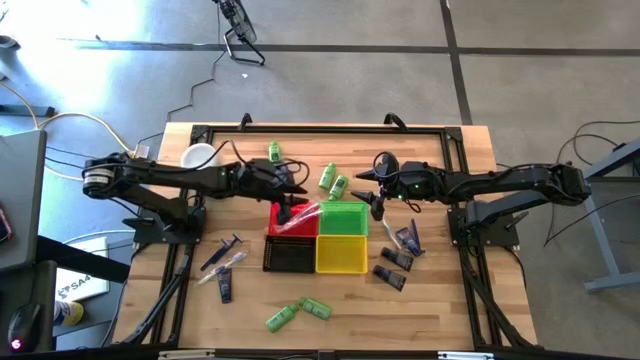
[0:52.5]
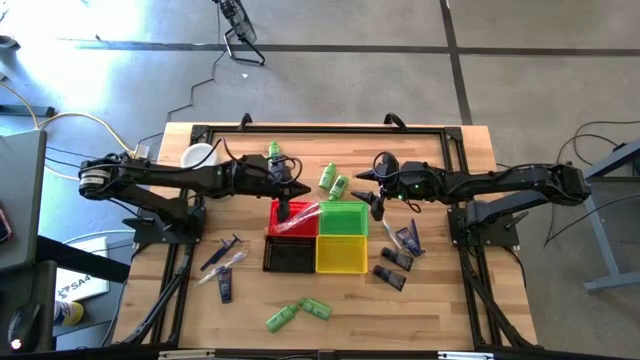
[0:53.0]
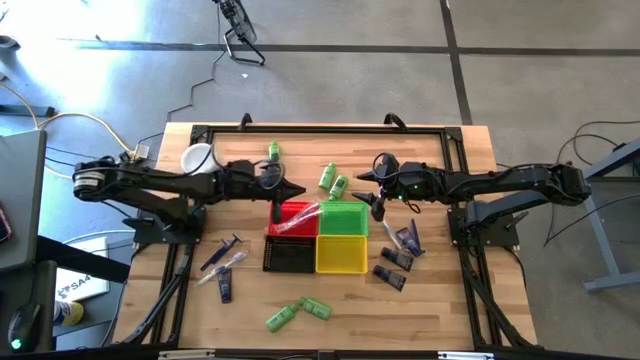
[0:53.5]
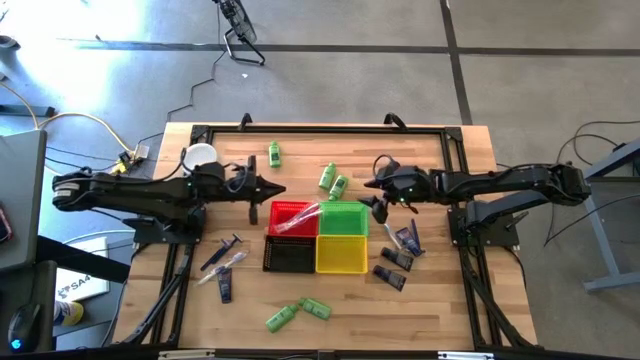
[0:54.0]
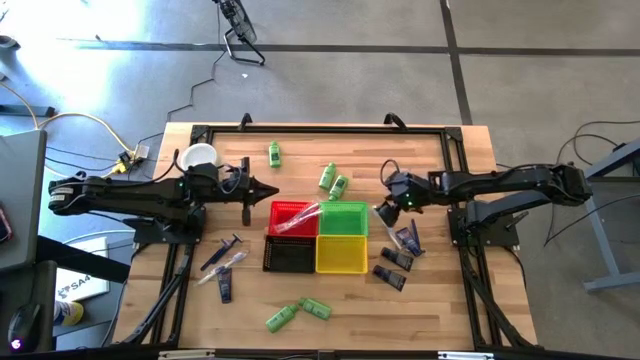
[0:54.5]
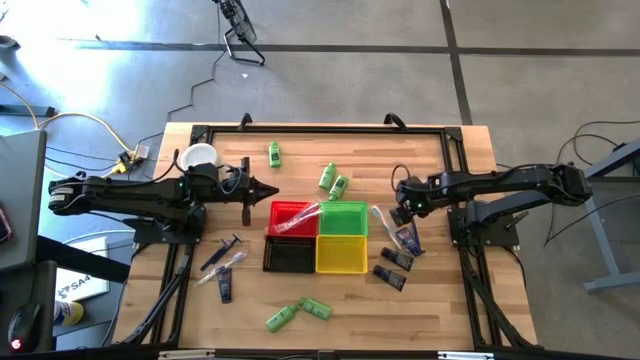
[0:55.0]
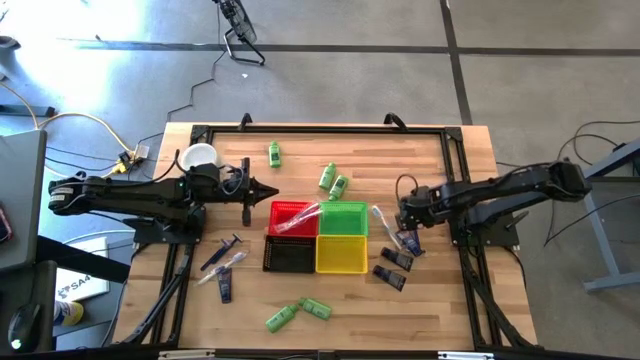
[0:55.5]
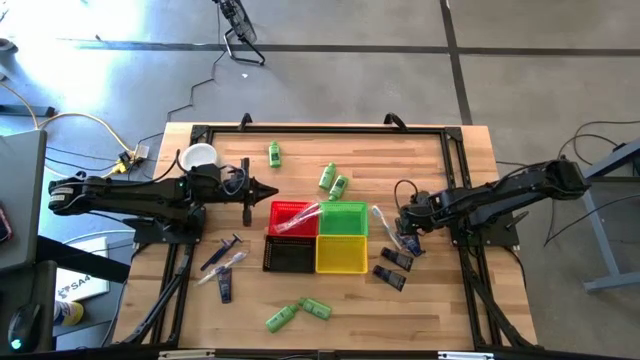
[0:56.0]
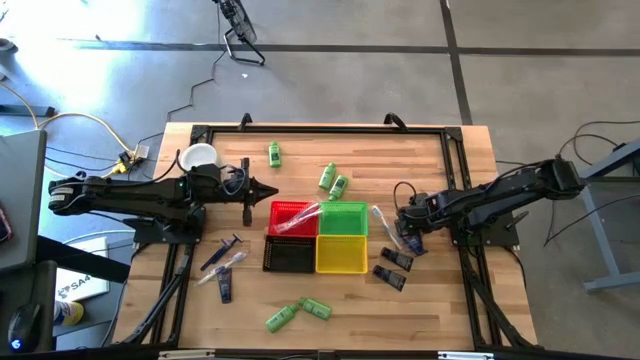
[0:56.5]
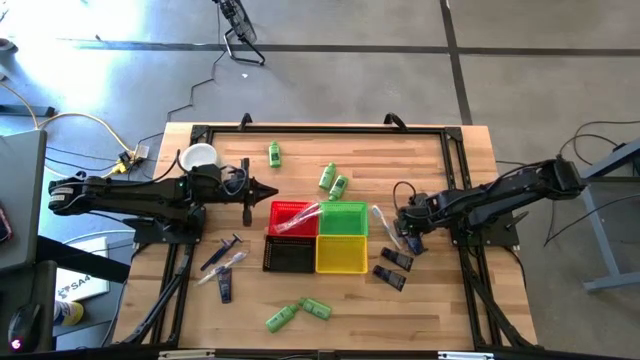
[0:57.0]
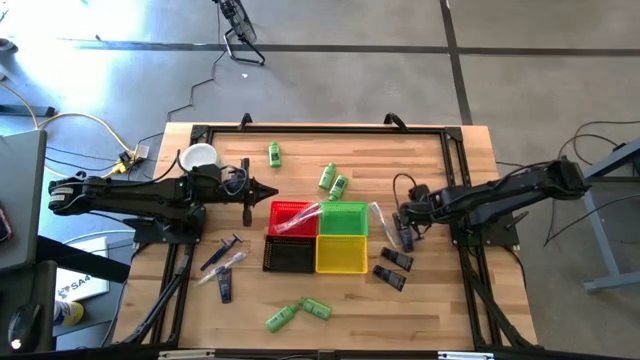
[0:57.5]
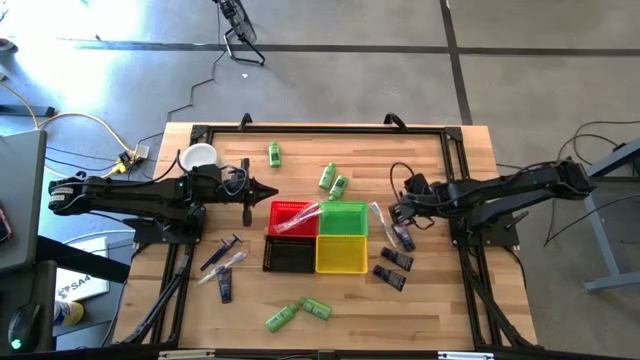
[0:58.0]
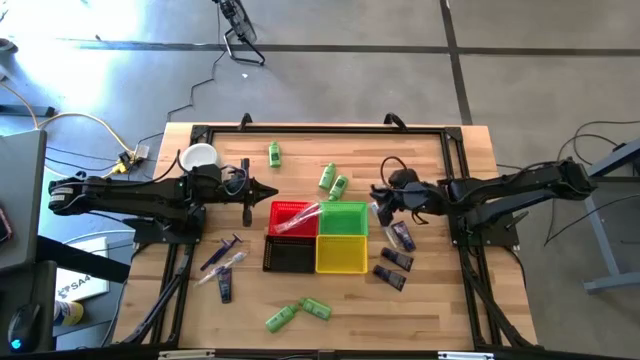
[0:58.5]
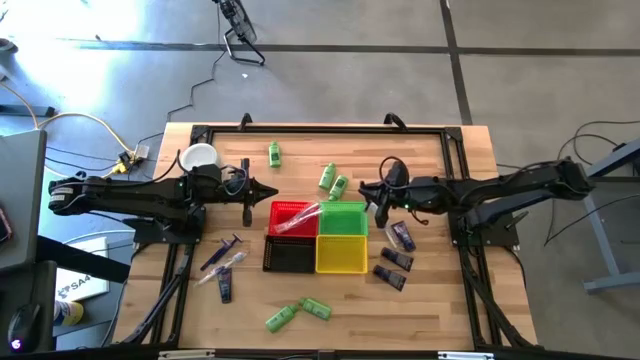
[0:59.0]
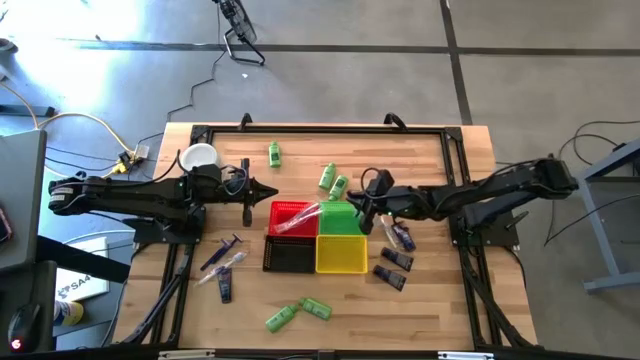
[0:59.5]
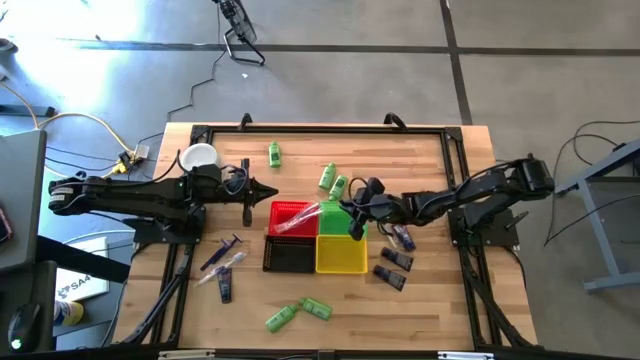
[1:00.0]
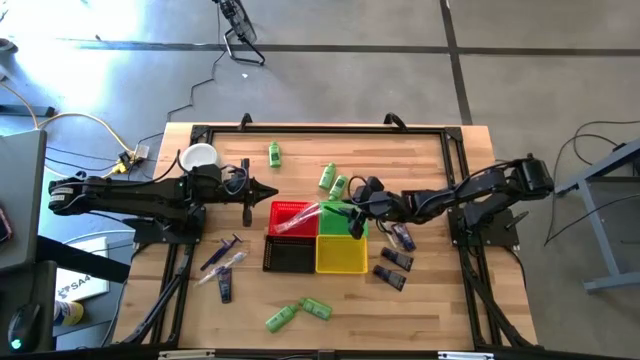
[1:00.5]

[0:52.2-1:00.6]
Task: Pick & Place Travel size toiletries
Put the blue razor into the green bin

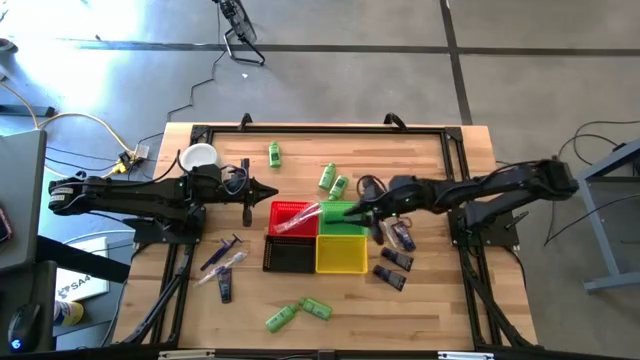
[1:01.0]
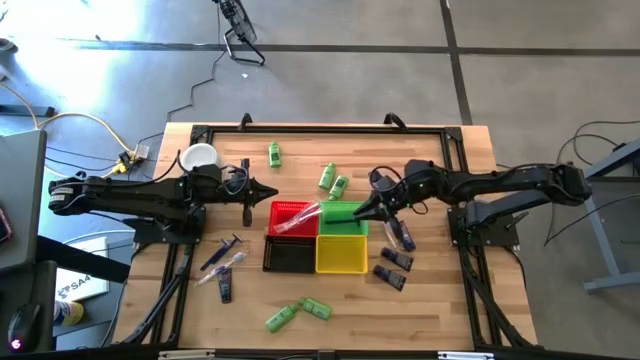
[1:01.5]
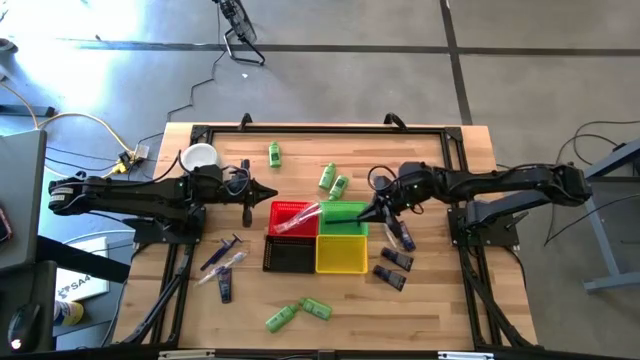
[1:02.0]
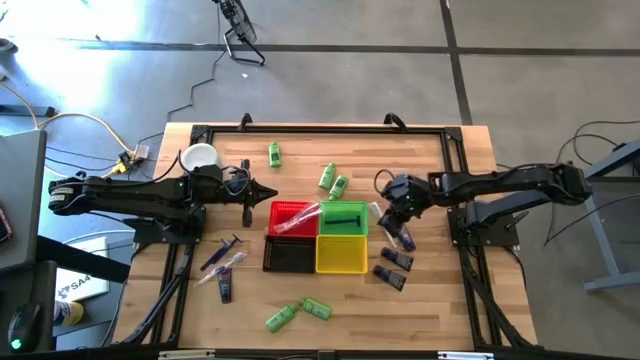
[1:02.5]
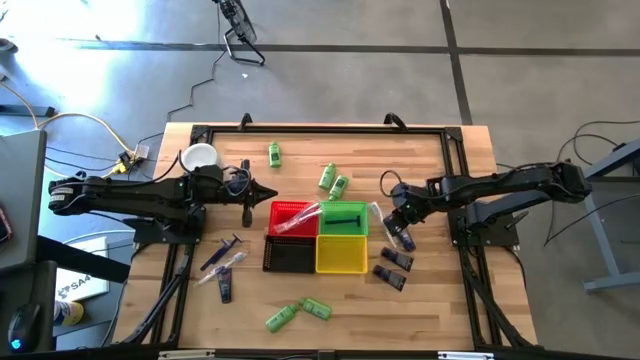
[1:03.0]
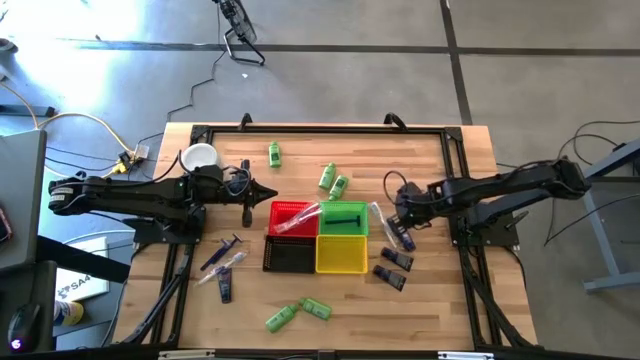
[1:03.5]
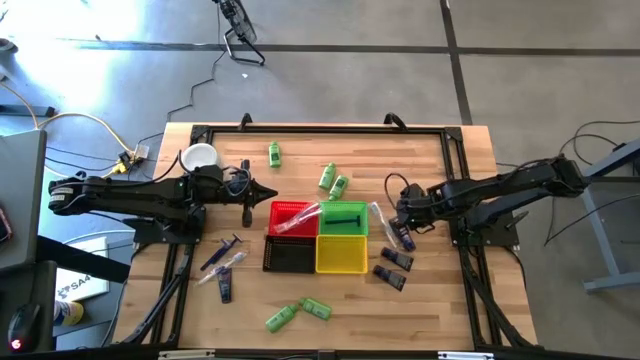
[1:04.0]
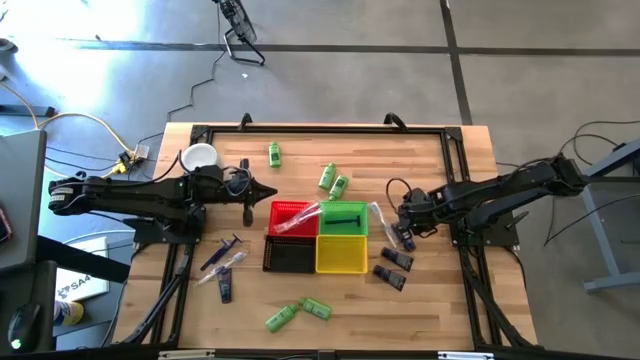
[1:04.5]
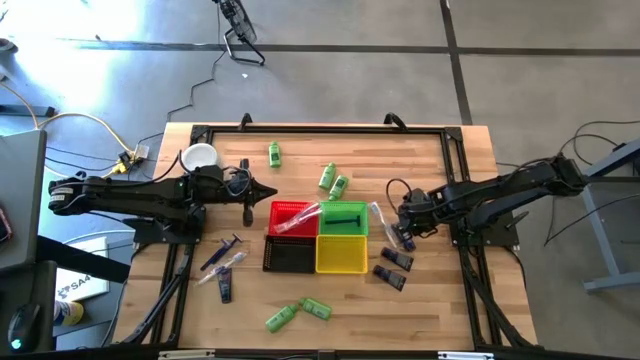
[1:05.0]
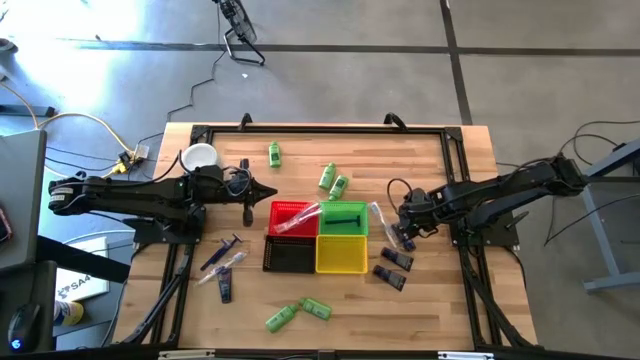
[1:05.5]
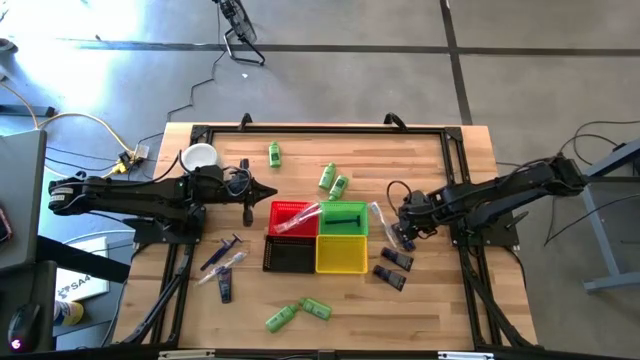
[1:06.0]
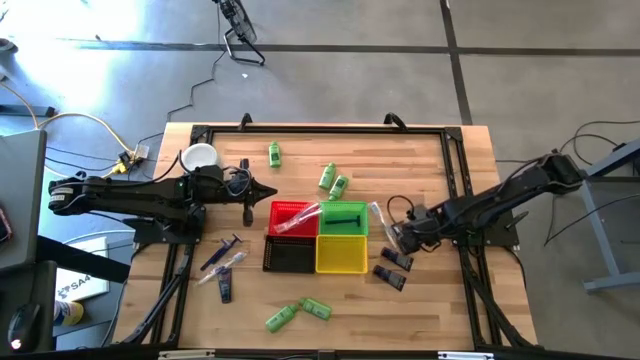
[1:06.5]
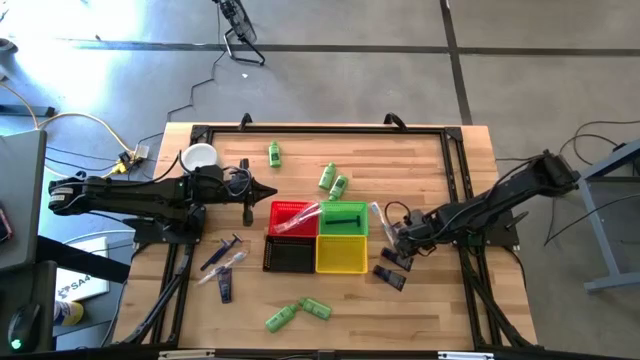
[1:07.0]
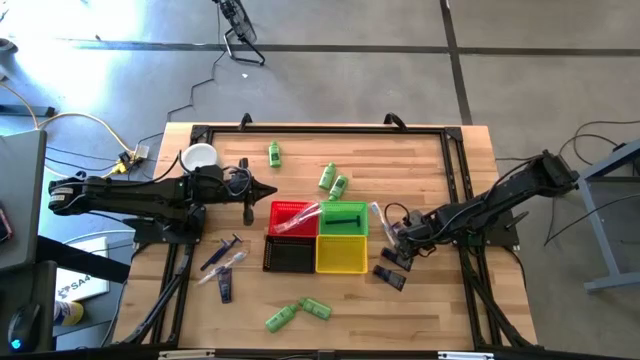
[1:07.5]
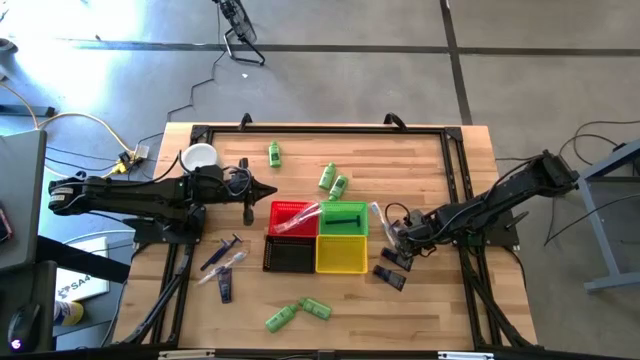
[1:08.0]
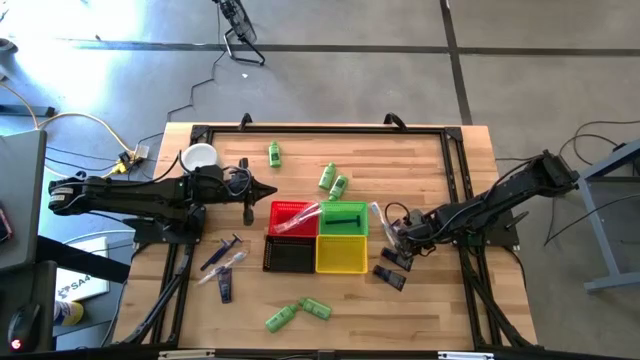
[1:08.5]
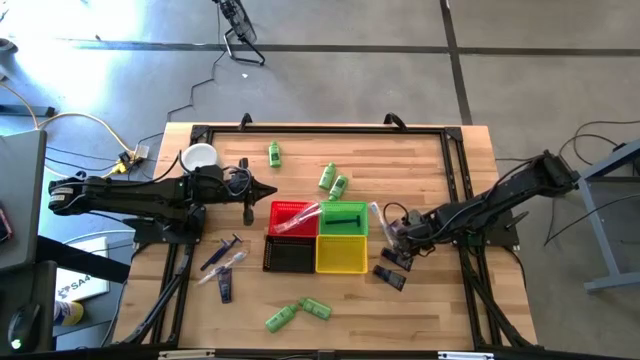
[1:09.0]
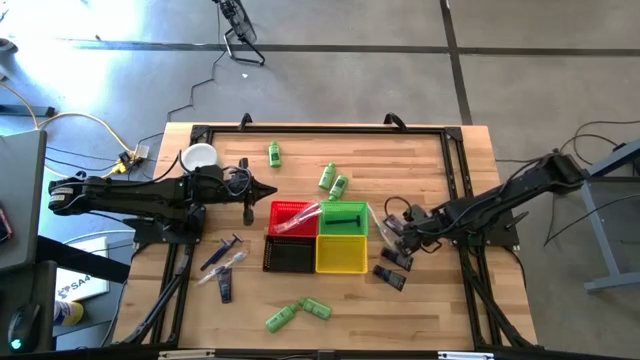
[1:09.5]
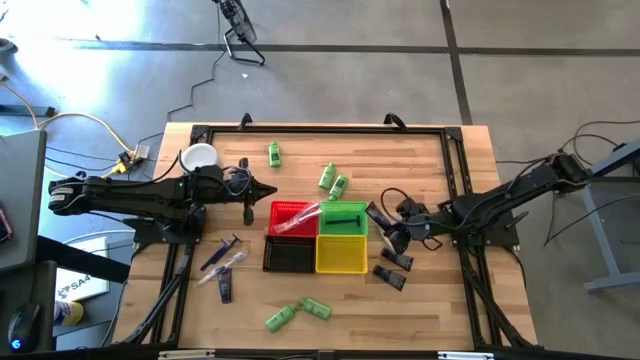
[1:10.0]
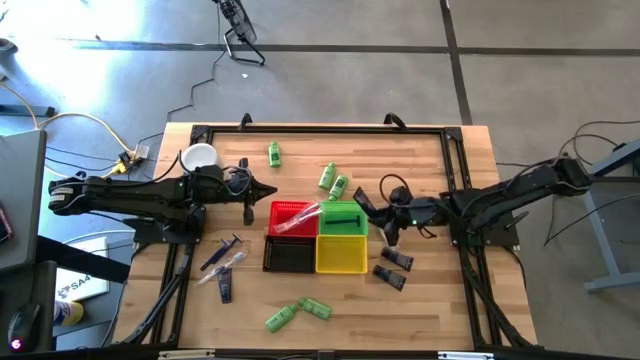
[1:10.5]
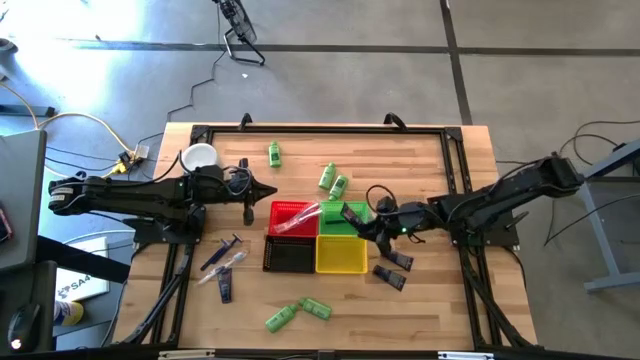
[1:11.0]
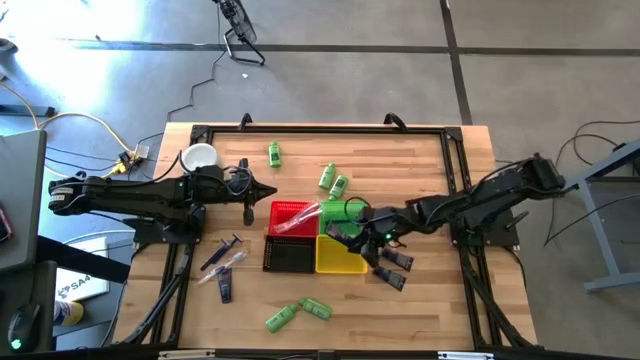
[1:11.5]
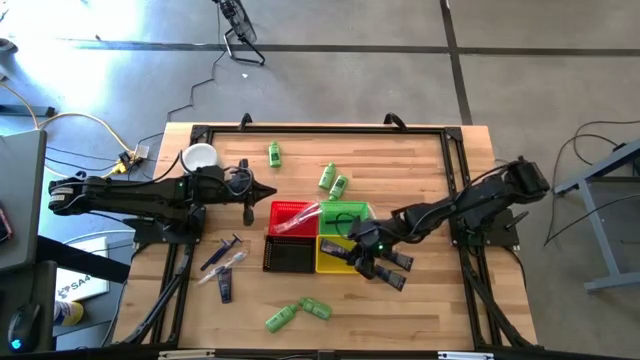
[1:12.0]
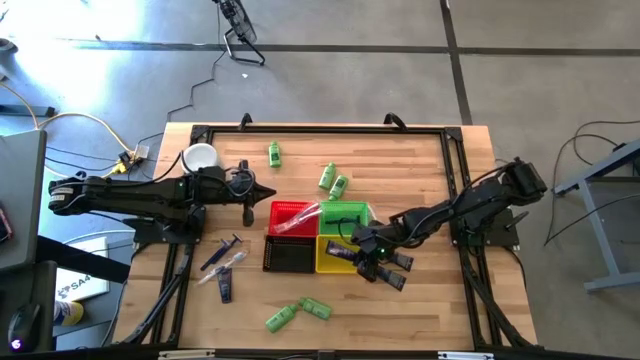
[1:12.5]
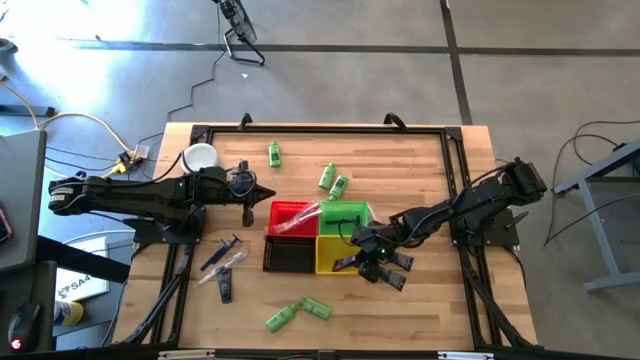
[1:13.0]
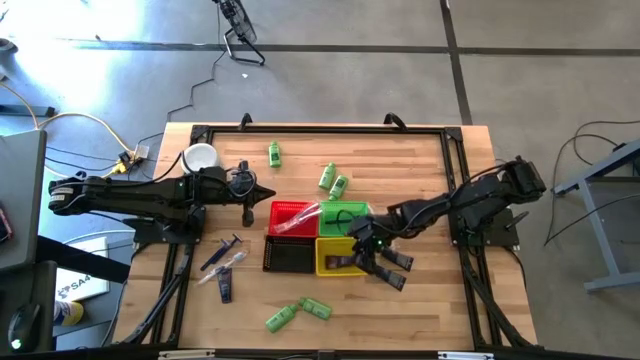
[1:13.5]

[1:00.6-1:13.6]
Put the dark blue shaving cream into the yellow bin
